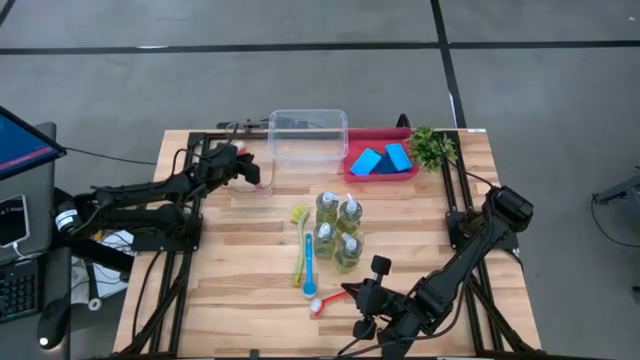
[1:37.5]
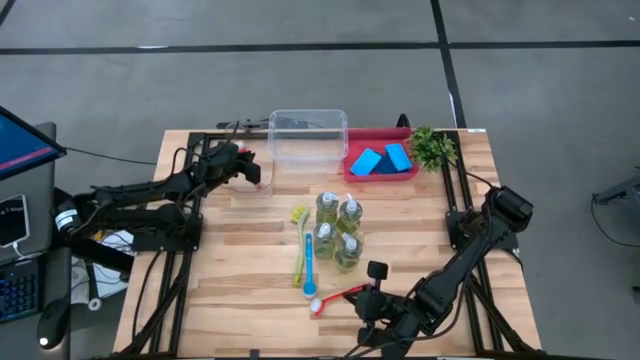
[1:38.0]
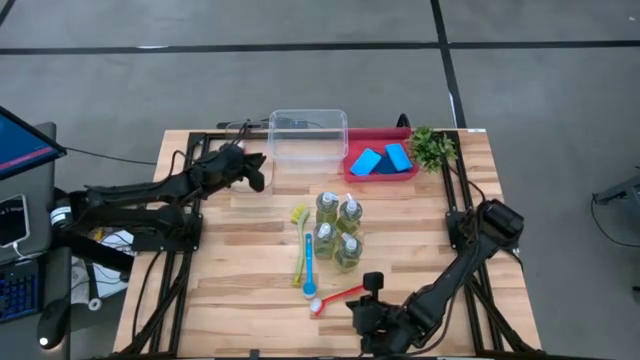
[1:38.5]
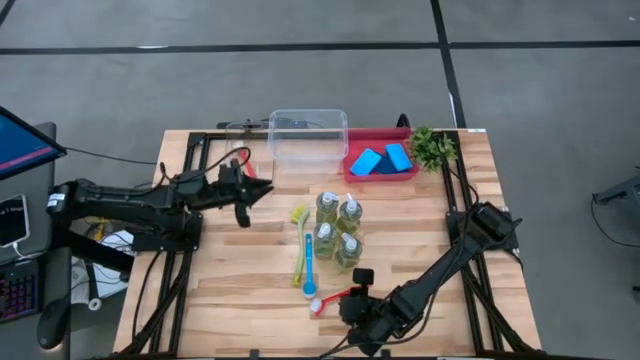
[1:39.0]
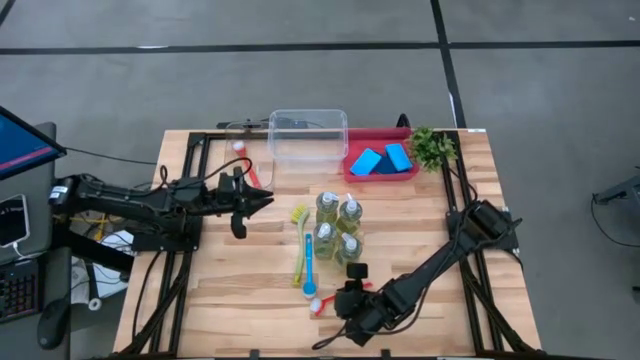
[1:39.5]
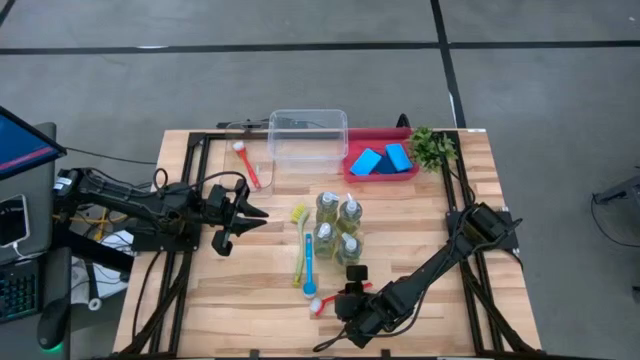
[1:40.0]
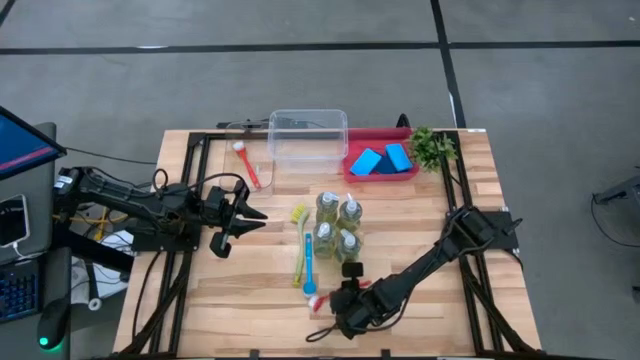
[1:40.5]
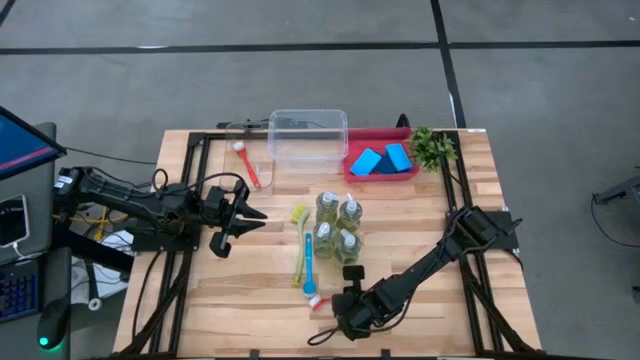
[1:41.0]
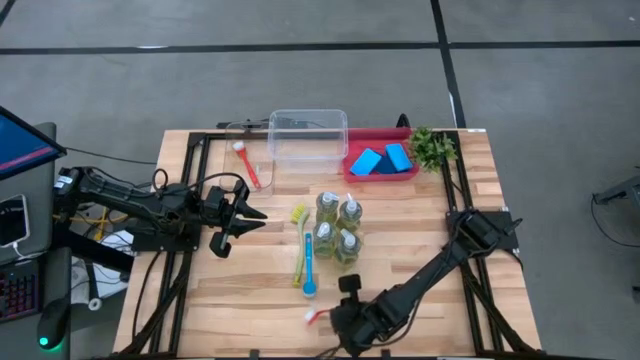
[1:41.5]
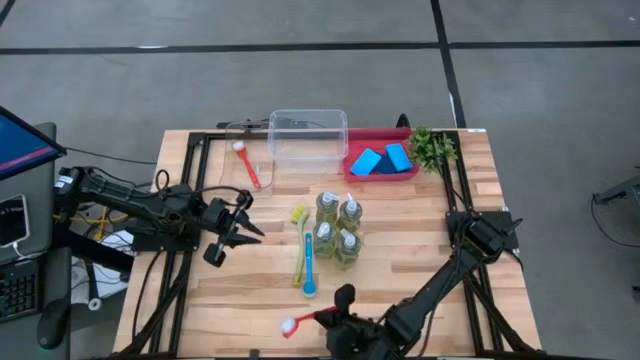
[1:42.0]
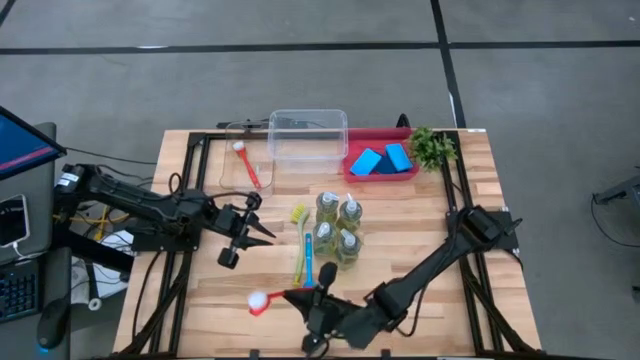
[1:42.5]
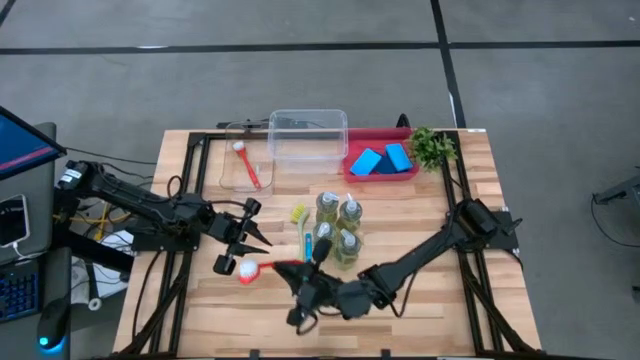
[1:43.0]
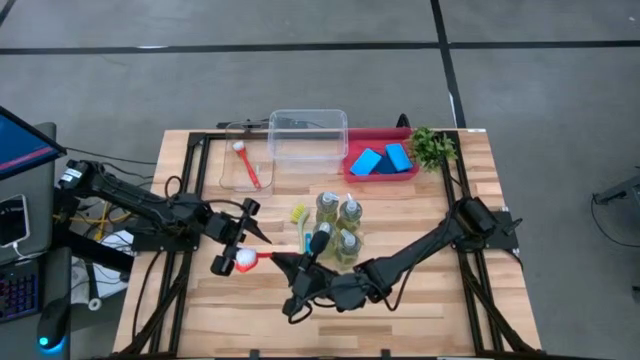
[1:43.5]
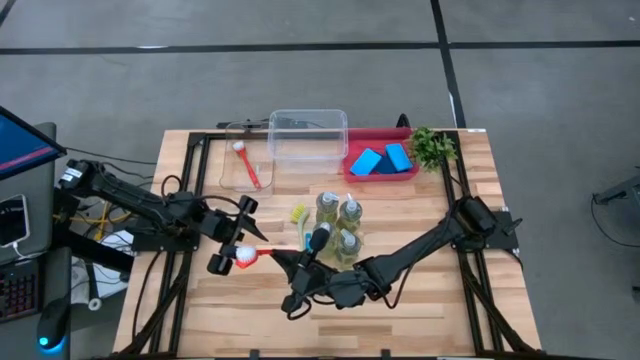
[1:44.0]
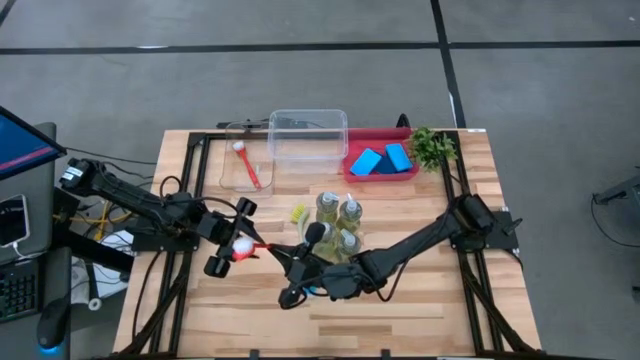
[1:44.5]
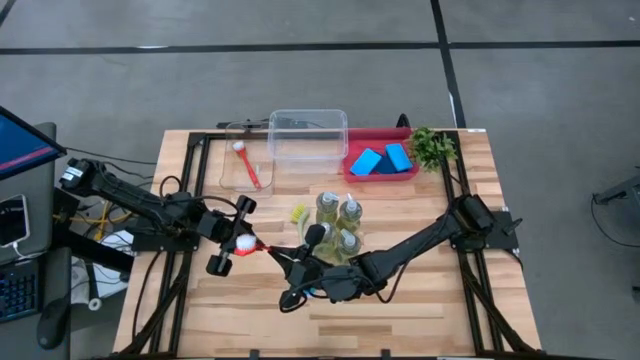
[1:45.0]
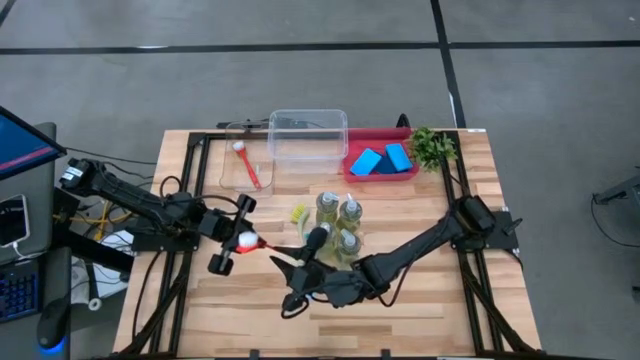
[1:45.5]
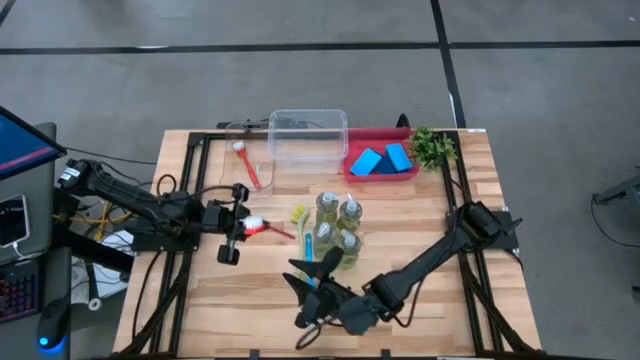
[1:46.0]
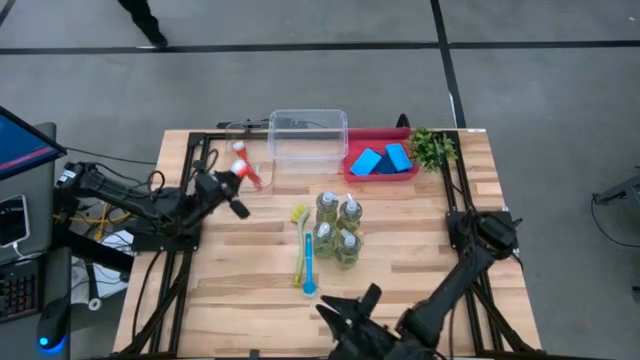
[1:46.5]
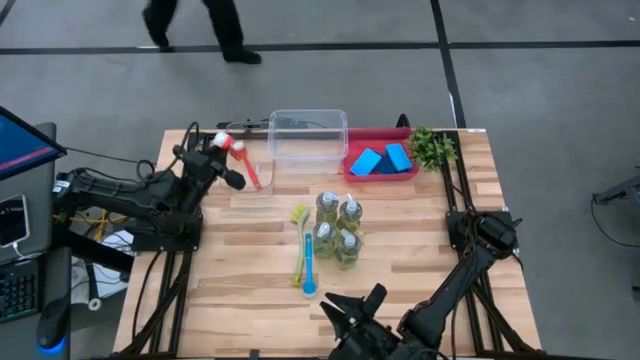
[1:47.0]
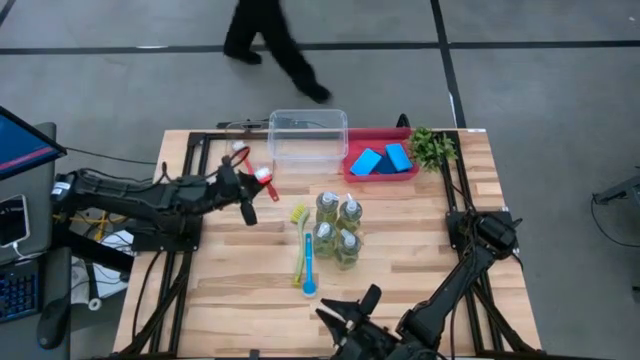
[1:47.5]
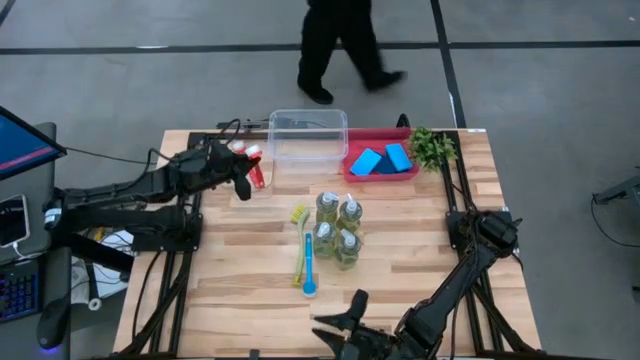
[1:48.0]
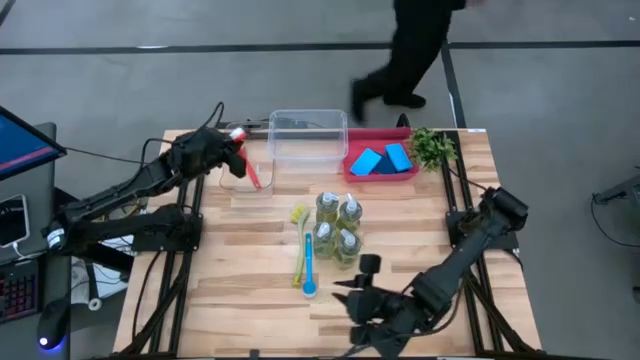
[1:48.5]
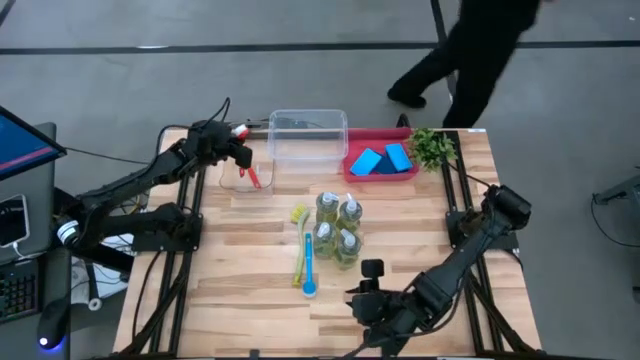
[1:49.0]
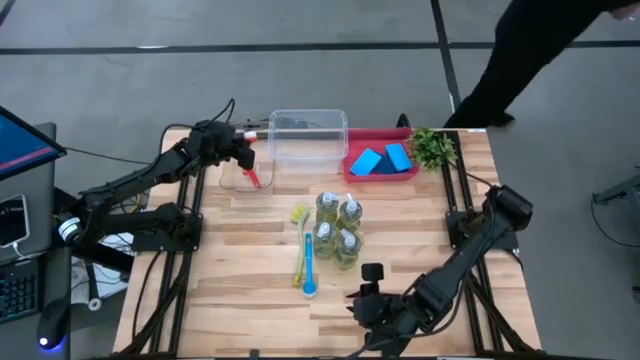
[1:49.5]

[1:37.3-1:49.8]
Task: Pick & Place Kitchen Sink Supplies
Put the red dish brush into the left transparent bin

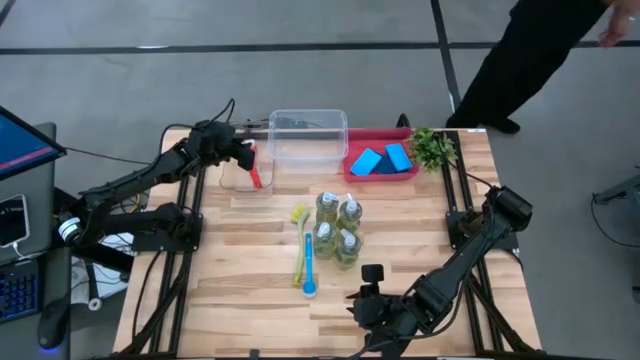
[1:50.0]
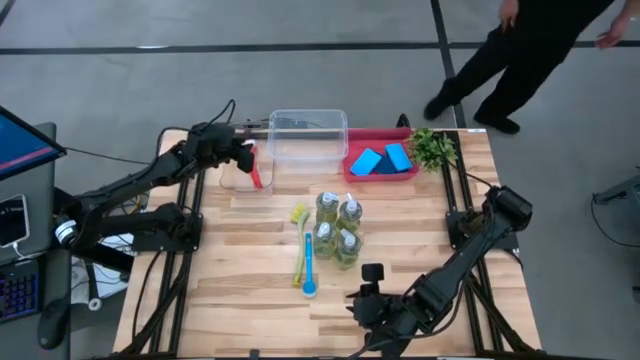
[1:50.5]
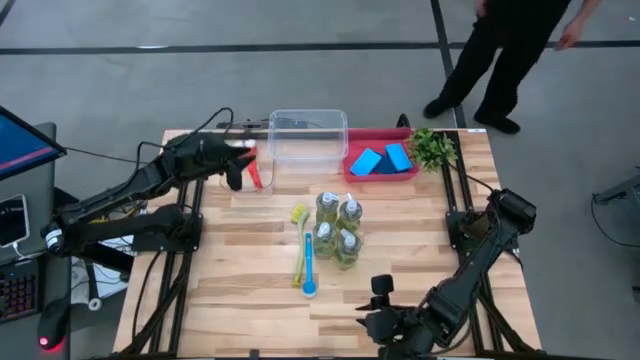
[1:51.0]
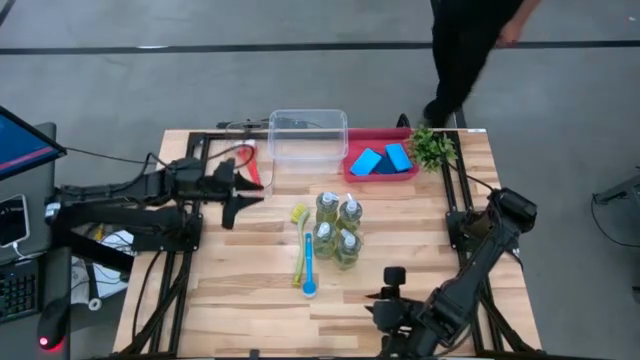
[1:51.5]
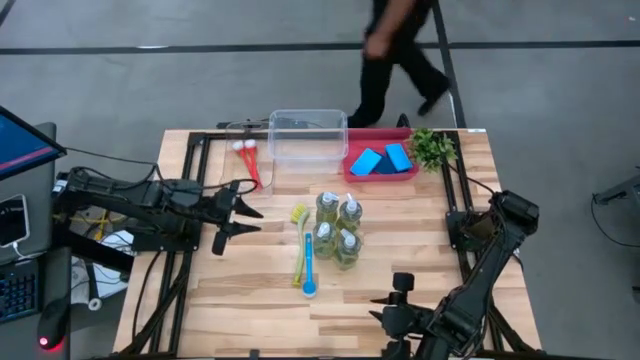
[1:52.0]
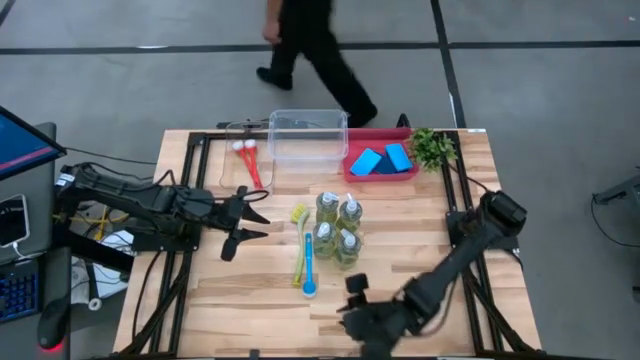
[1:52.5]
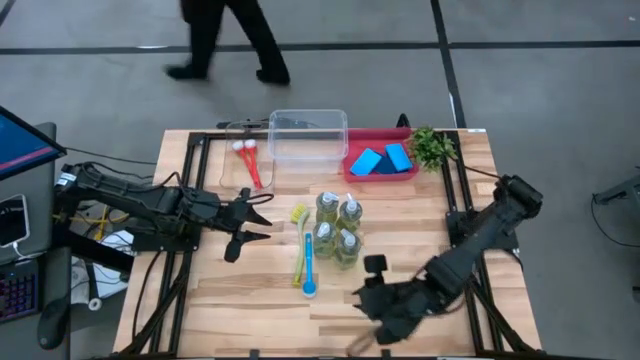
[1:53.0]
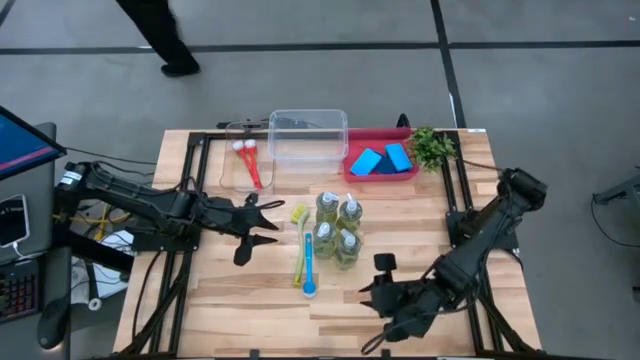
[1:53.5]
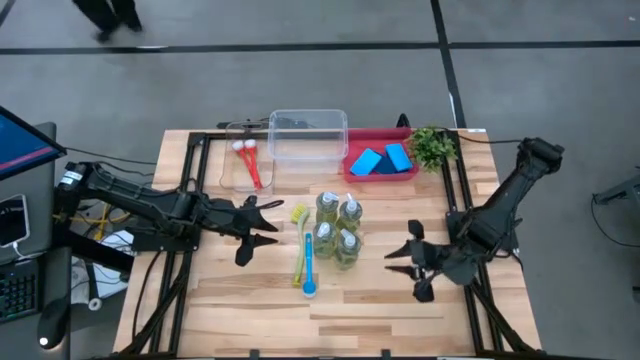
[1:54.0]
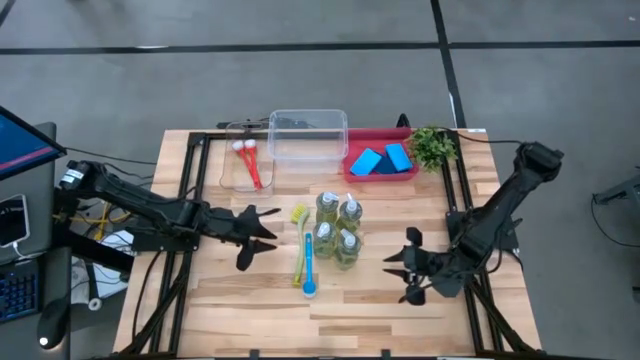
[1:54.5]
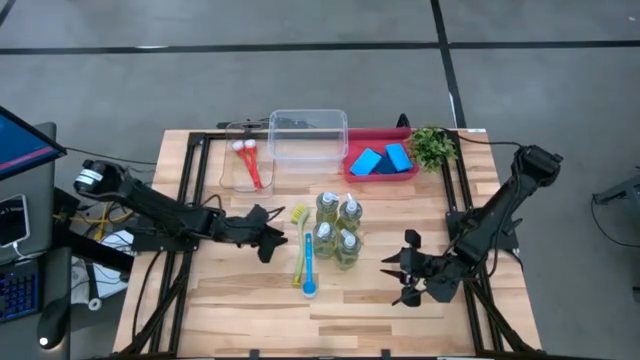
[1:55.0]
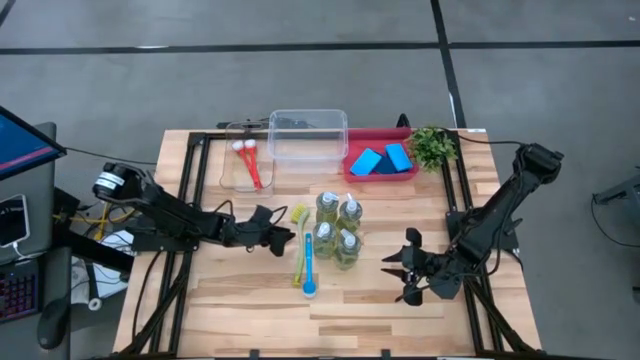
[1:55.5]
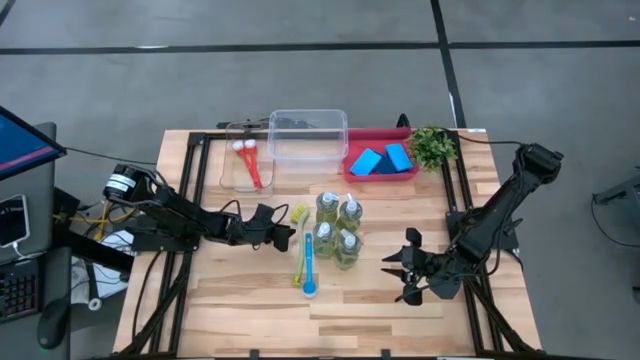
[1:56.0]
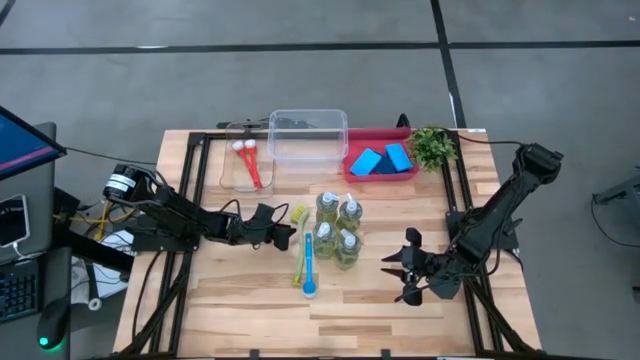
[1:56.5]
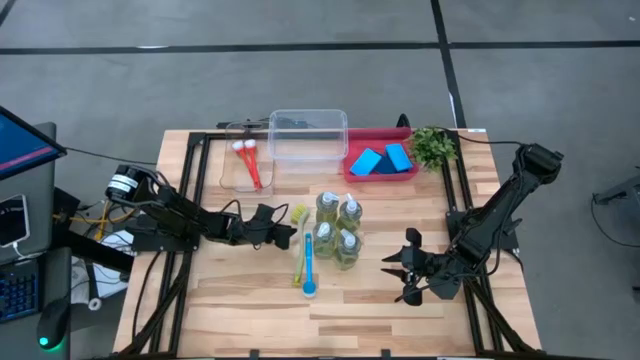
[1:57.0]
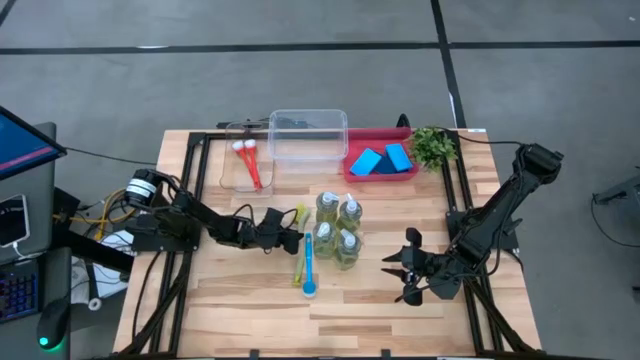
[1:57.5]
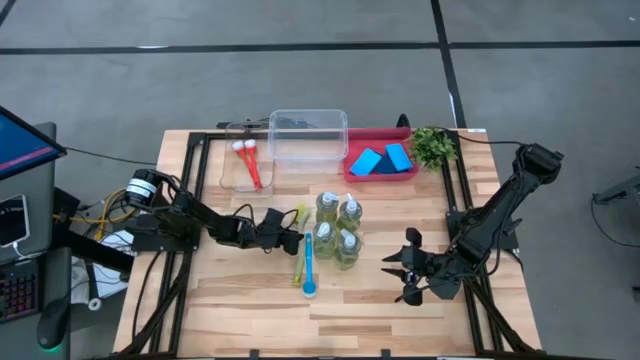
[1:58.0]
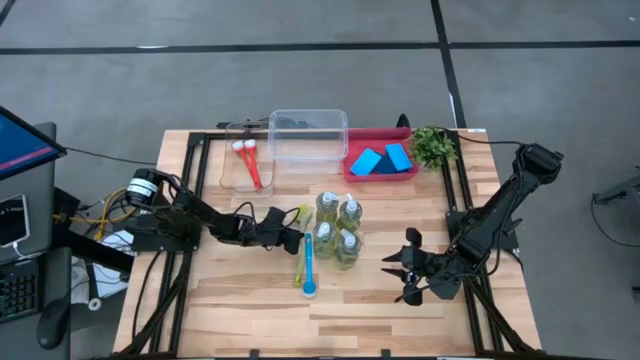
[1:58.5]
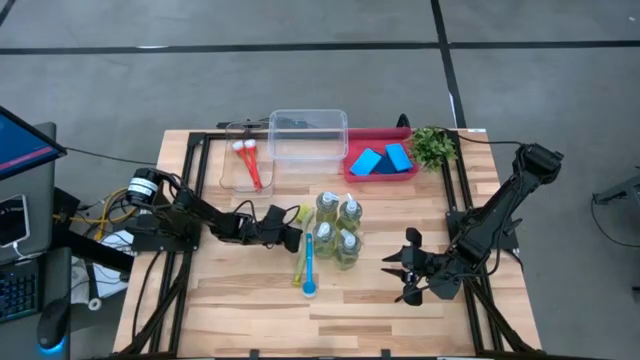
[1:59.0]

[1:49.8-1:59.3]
Put the light green dish brush into the left transparent bin
